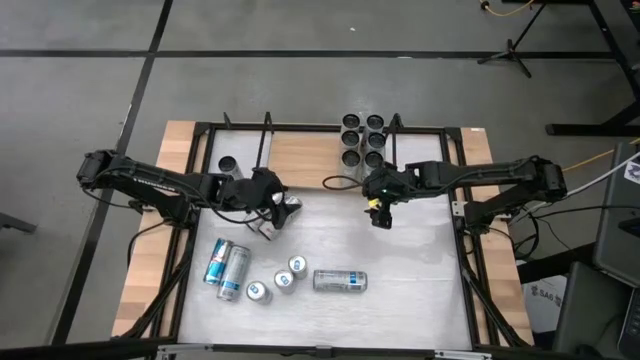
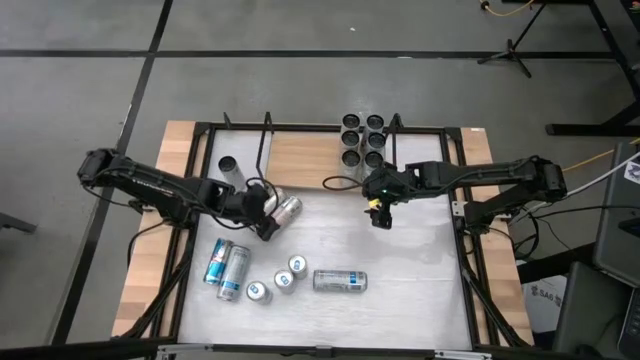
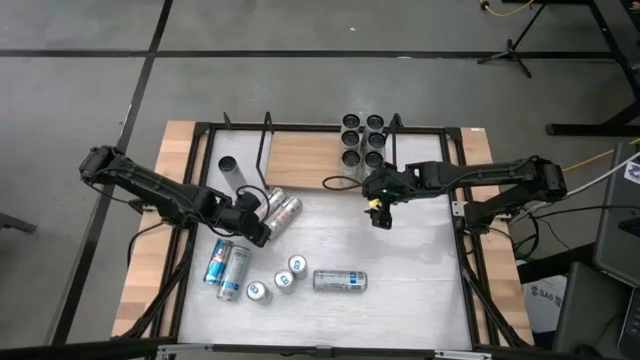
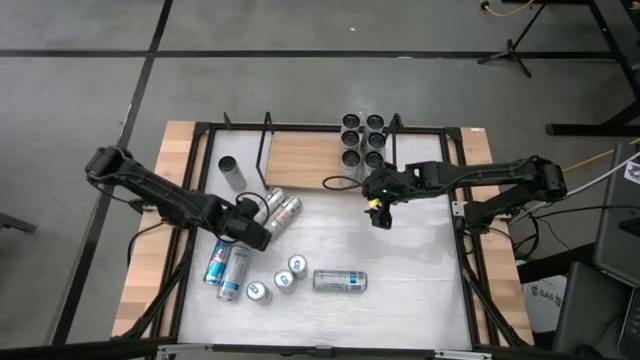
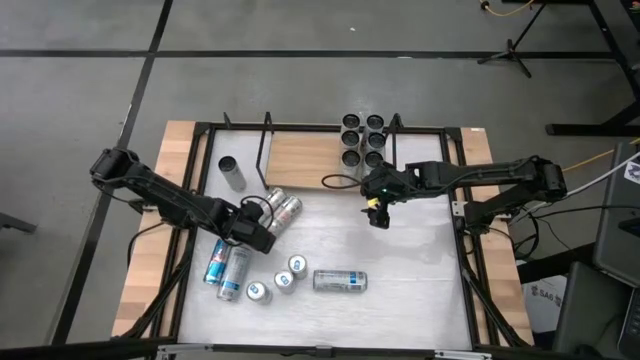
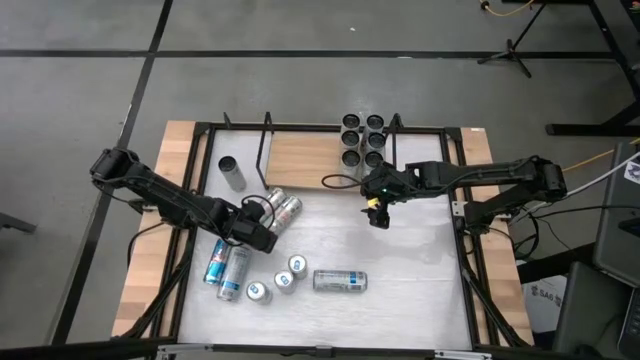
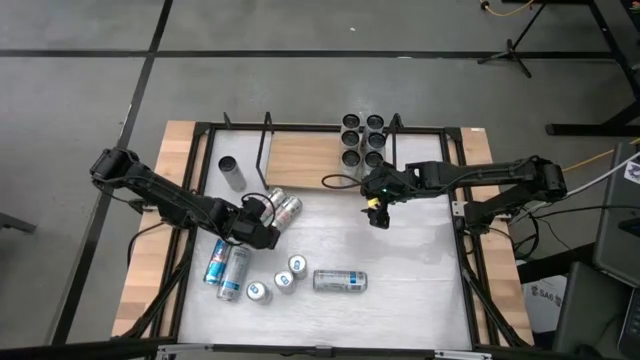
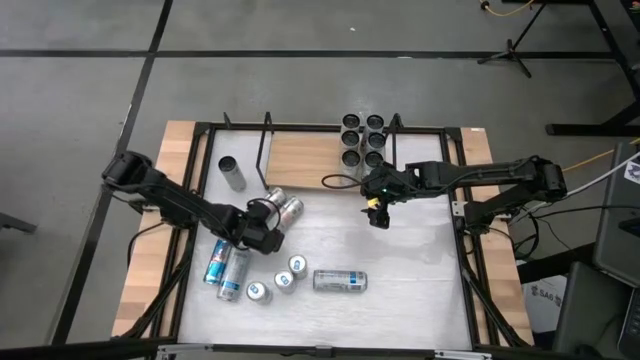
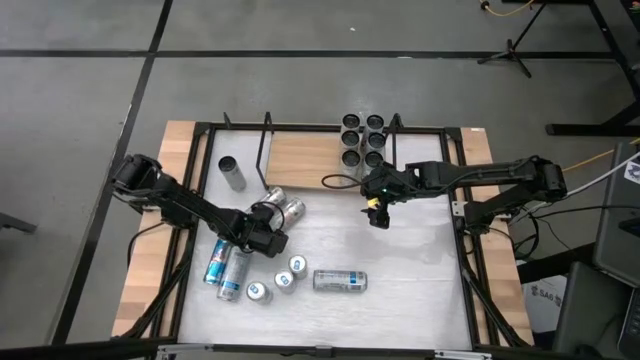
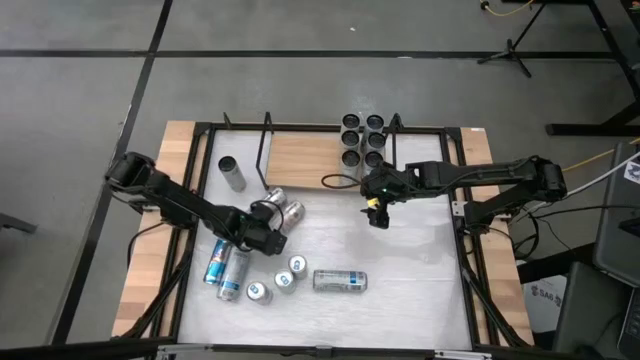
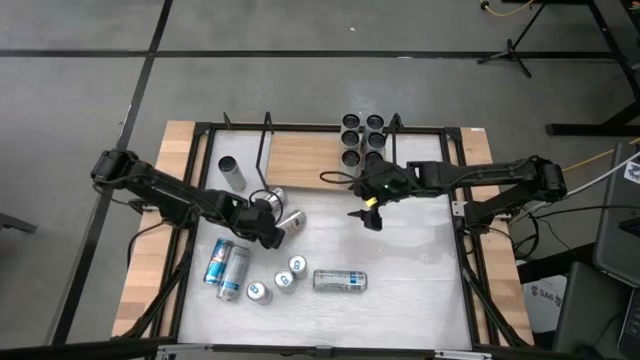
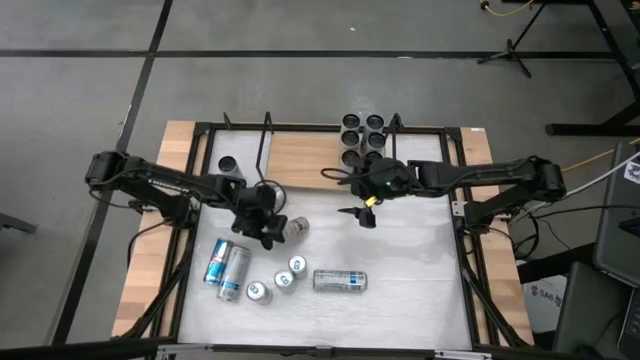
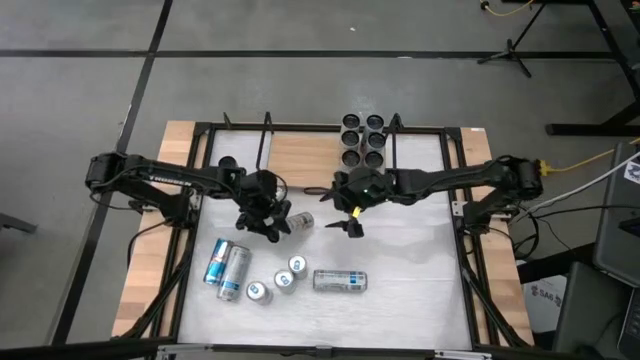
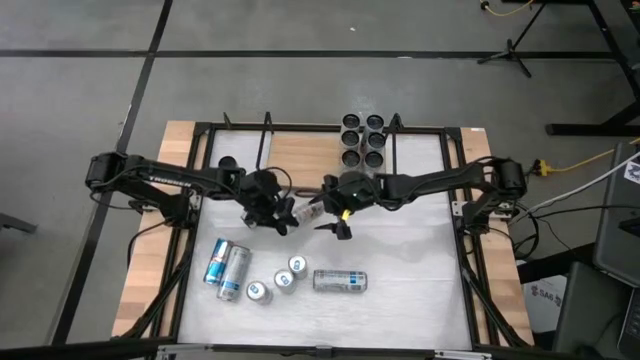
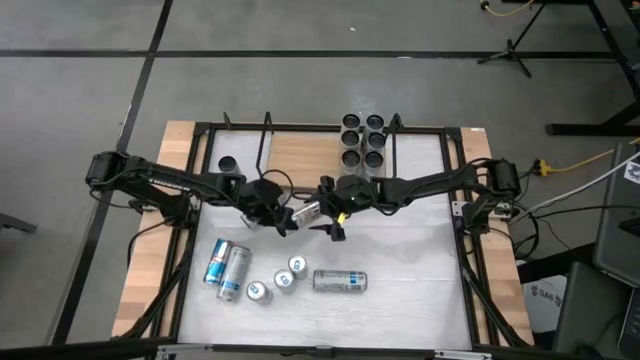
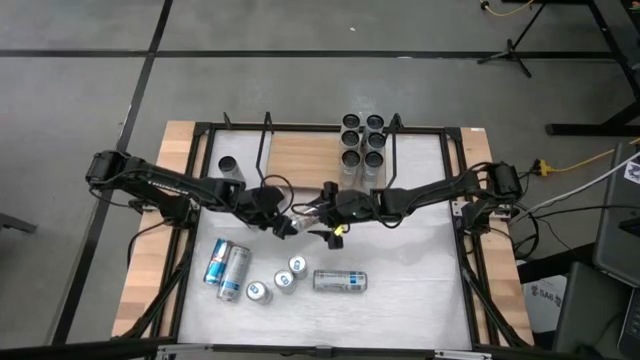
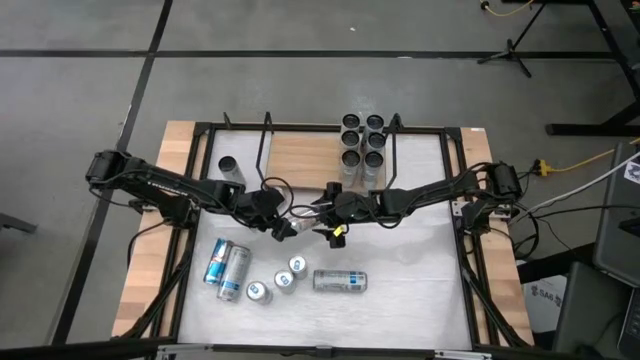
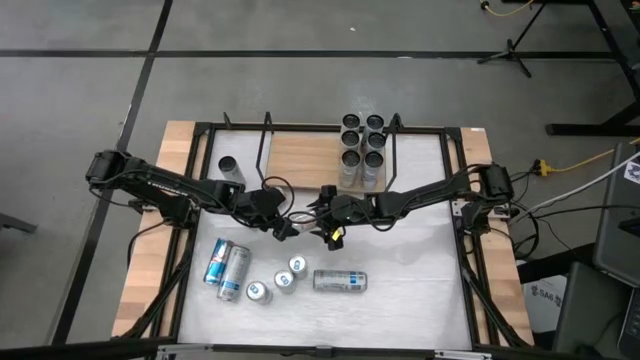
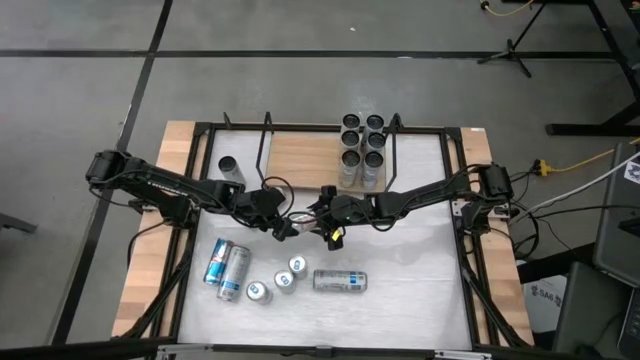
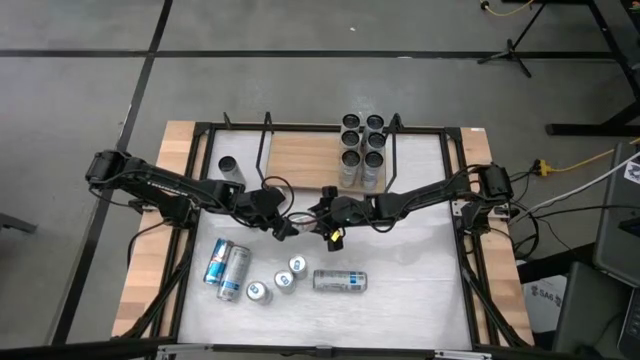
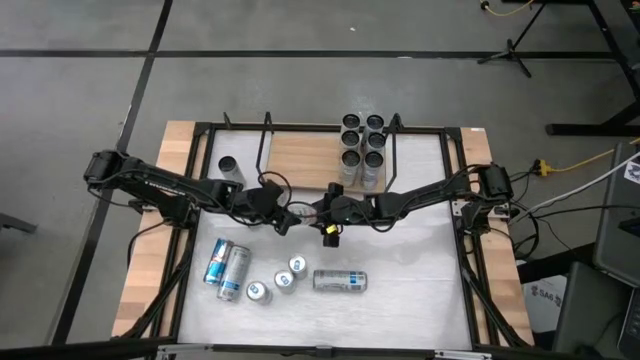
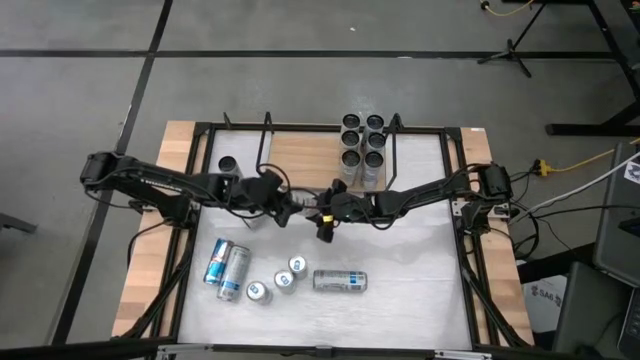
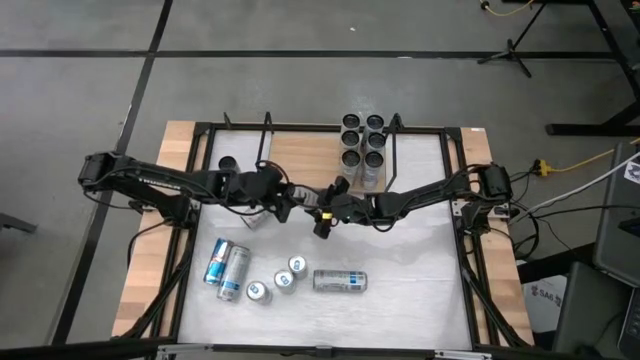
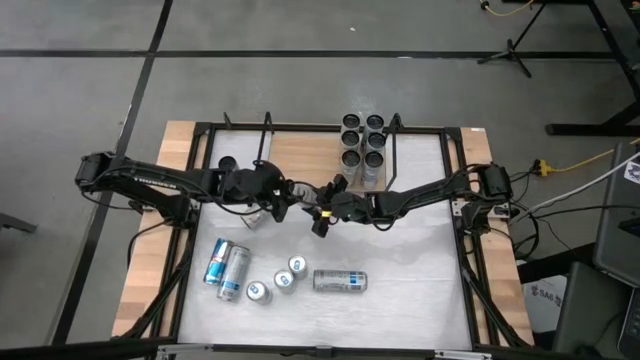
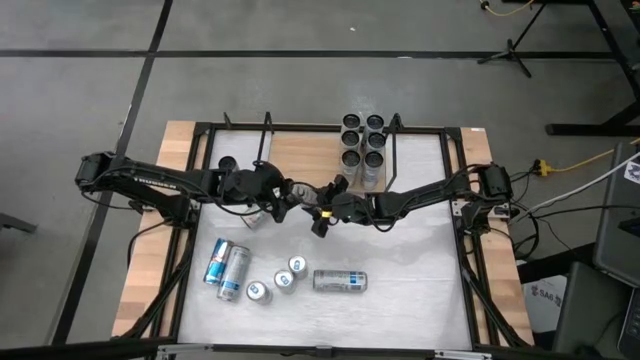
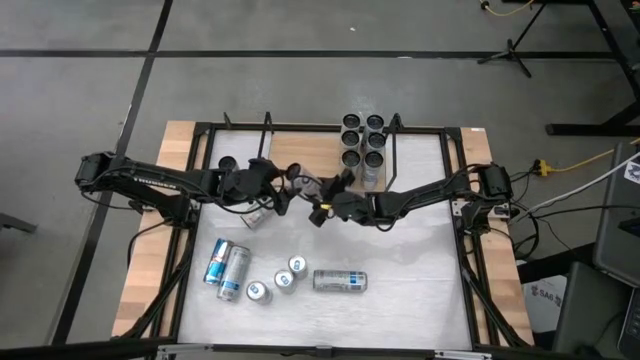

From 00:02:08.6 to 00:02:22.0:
Task: Place canned beverage on shelf
Put the white soda can on the shelf

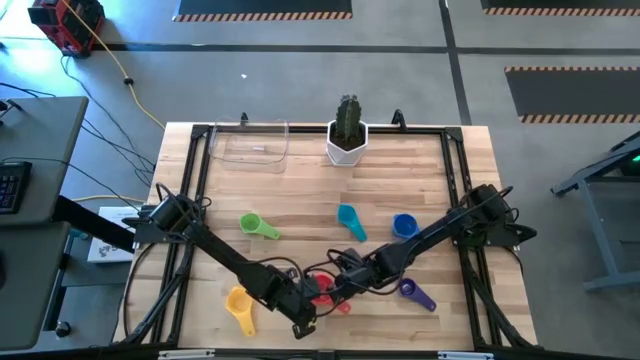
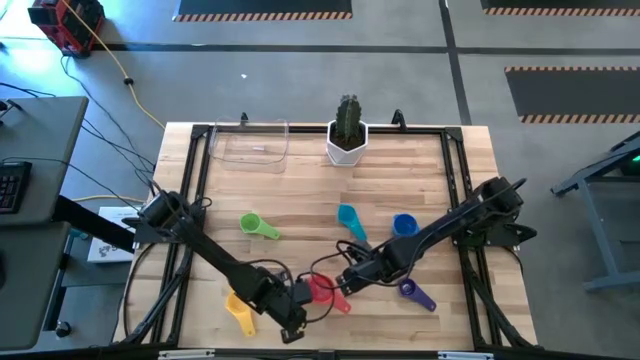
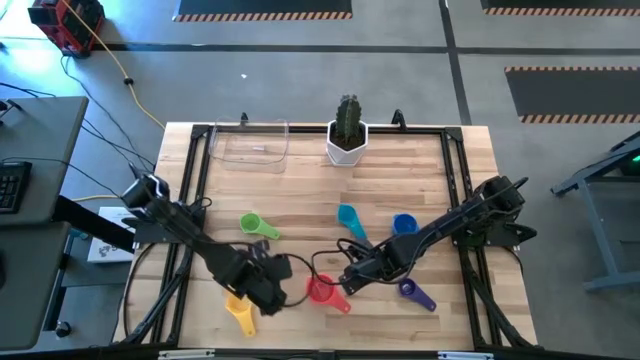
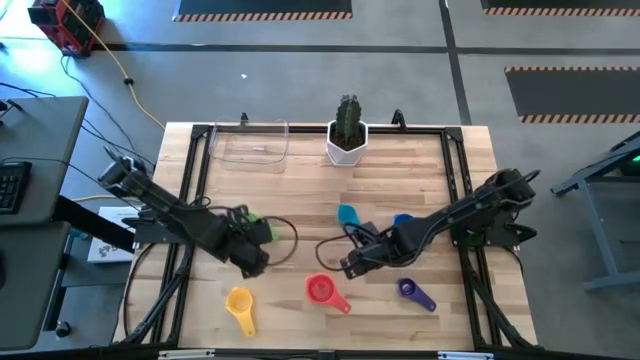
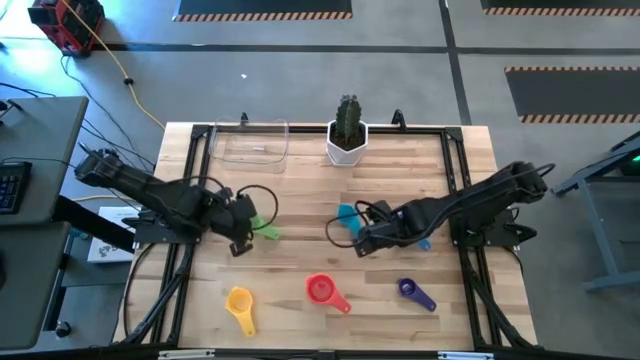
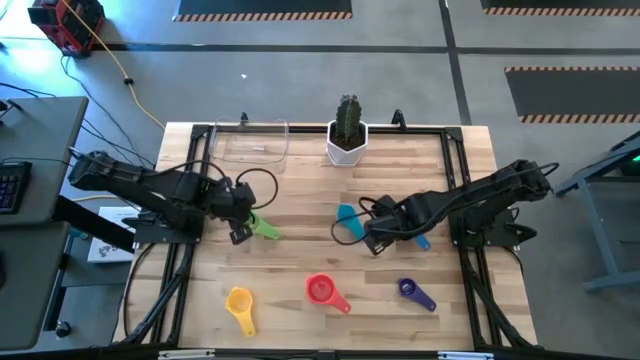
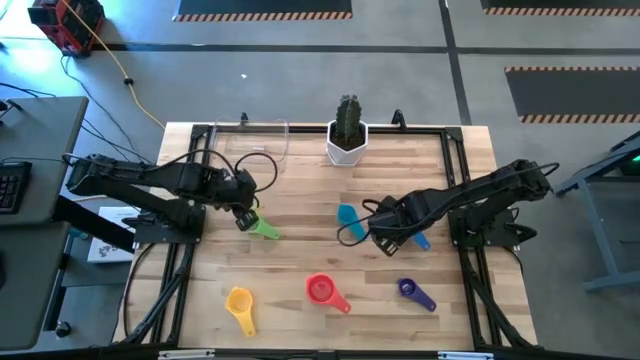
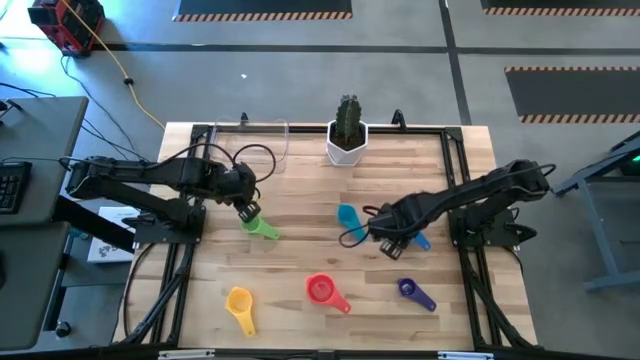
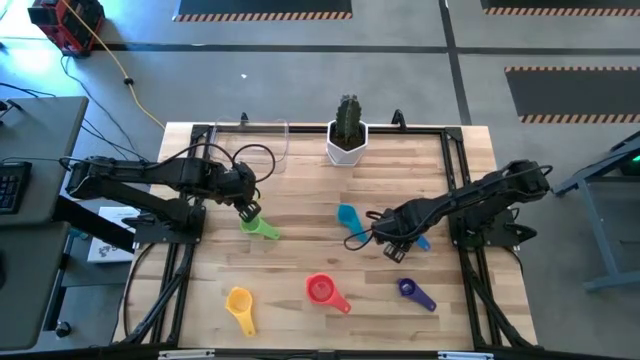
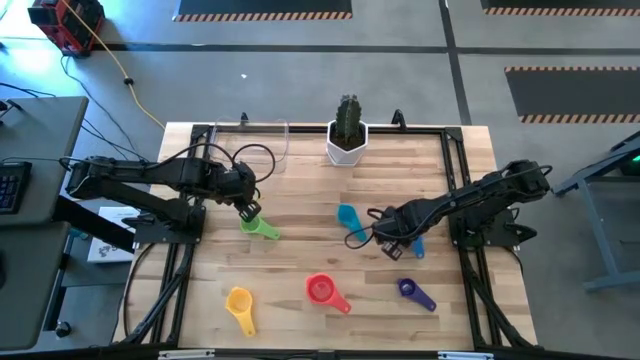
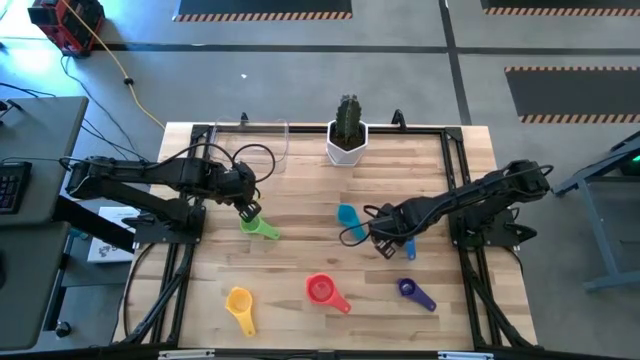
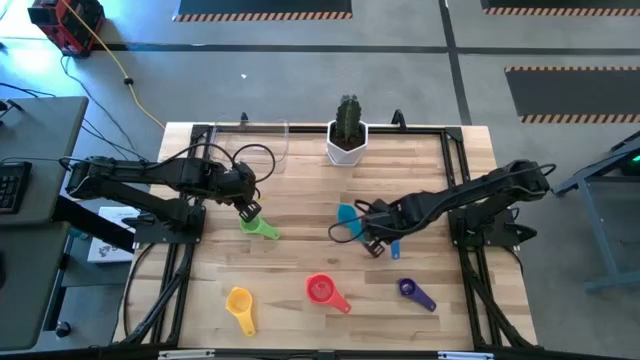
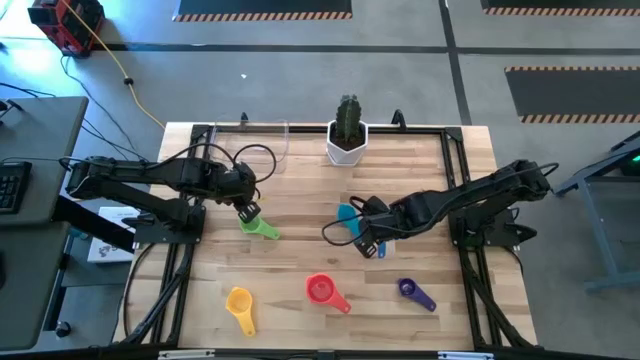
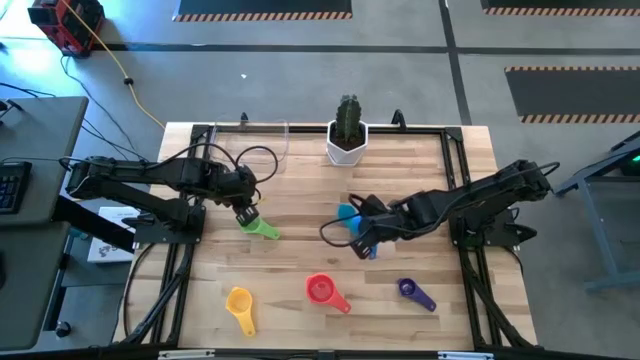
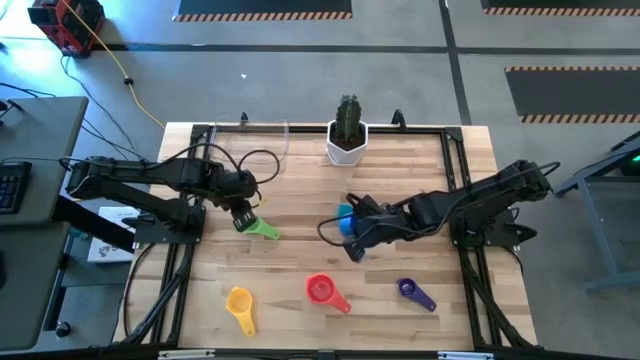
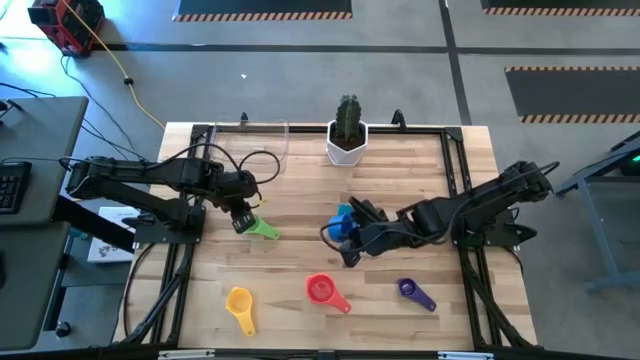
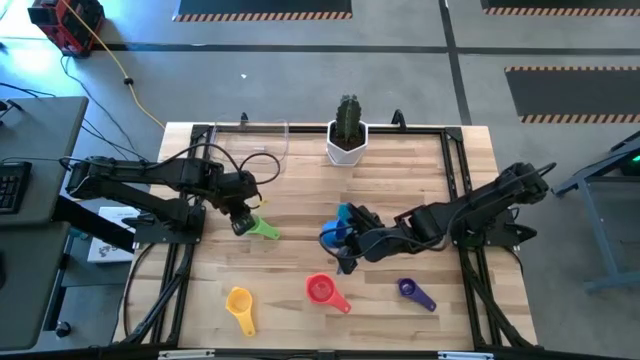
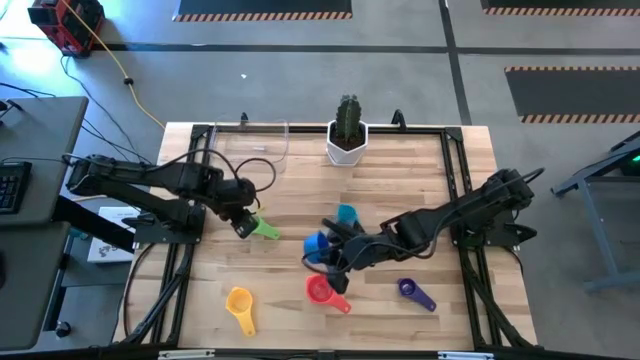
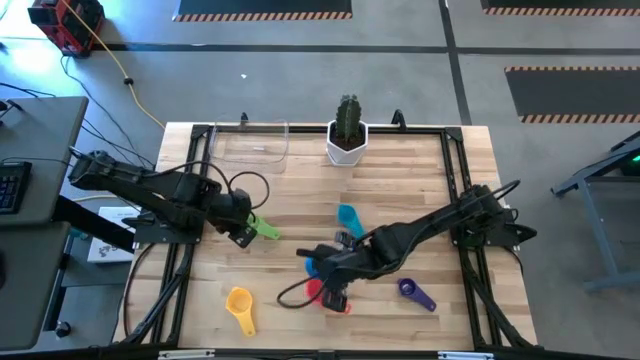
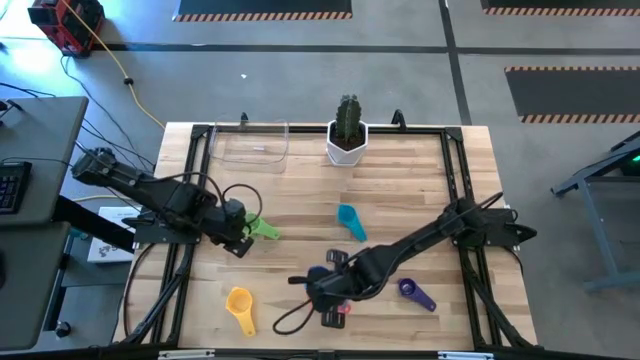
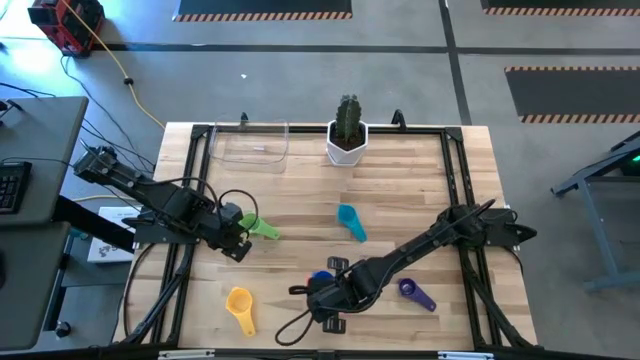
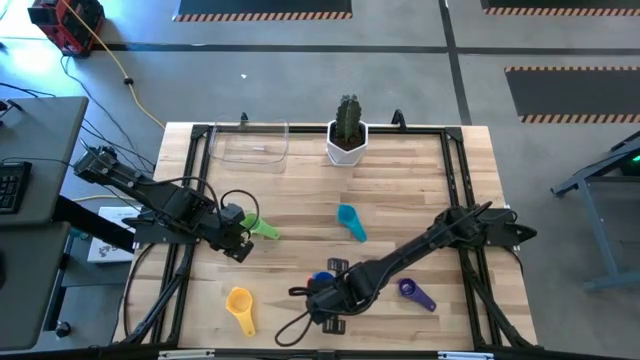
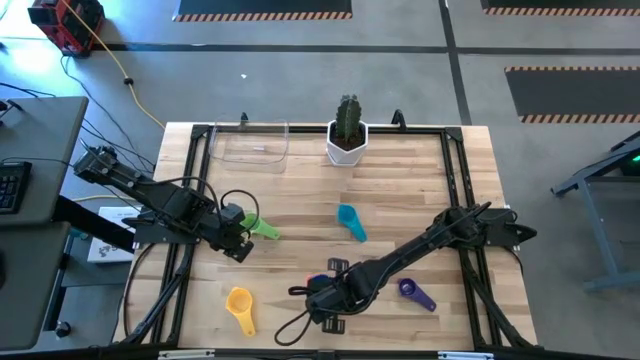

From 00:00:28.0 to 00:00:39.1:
Task: Nest measuring cups in basket
Stack the dark blue measuring cup on the pink measuring cup
